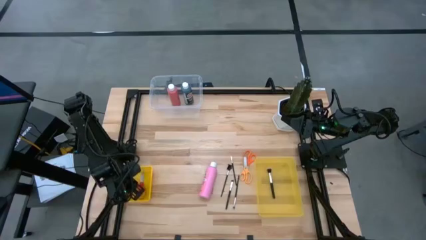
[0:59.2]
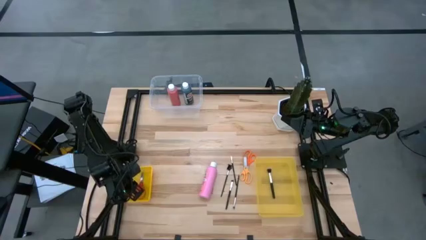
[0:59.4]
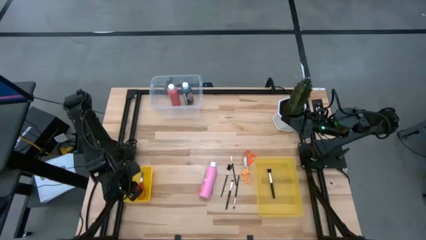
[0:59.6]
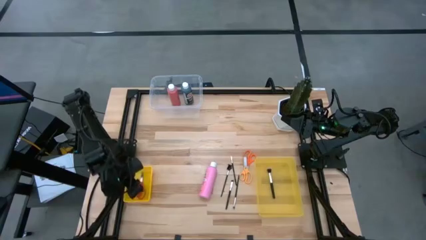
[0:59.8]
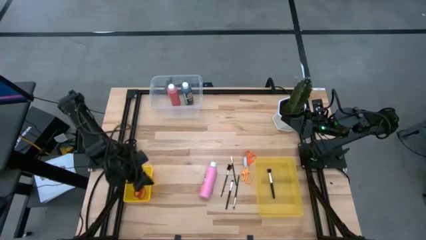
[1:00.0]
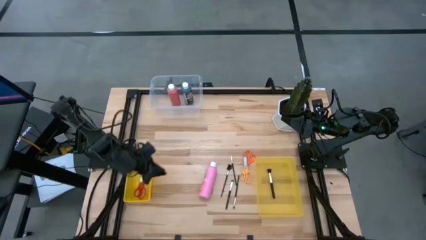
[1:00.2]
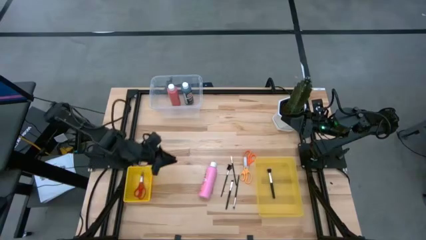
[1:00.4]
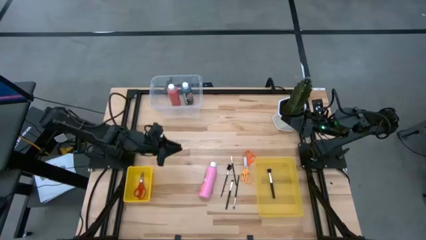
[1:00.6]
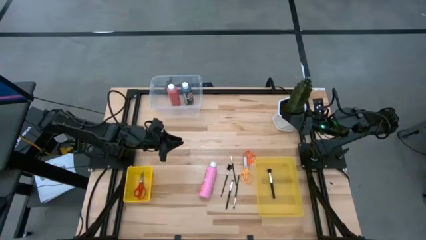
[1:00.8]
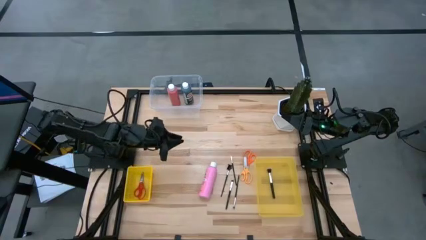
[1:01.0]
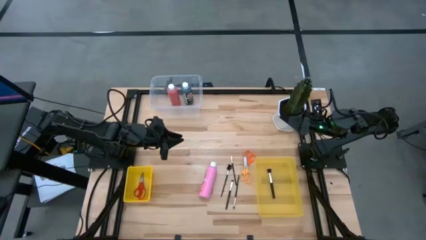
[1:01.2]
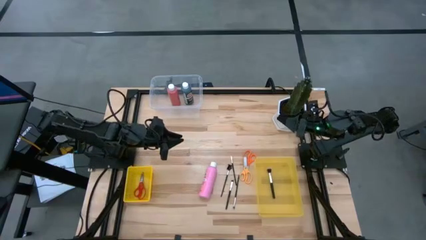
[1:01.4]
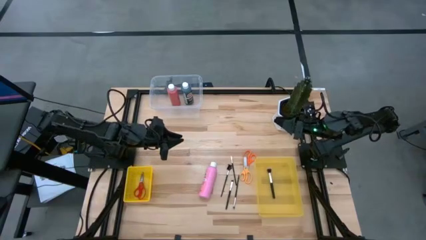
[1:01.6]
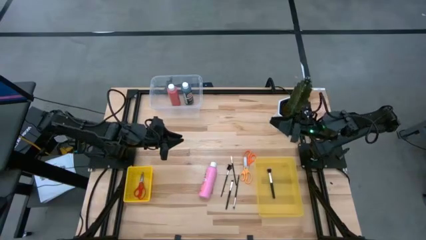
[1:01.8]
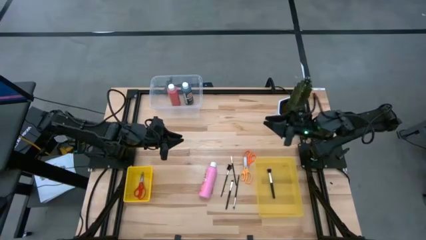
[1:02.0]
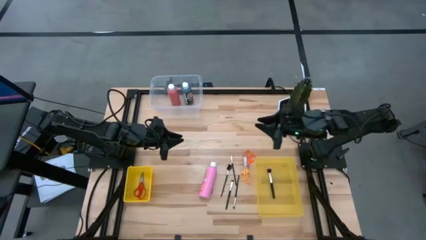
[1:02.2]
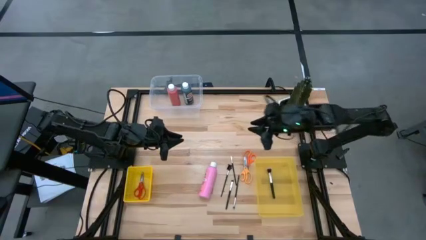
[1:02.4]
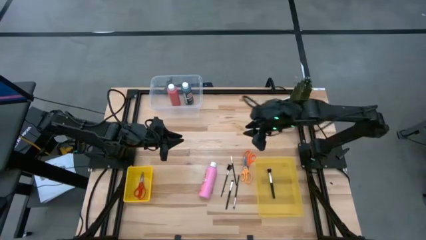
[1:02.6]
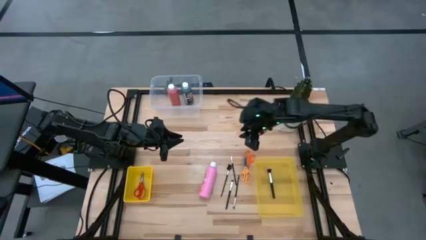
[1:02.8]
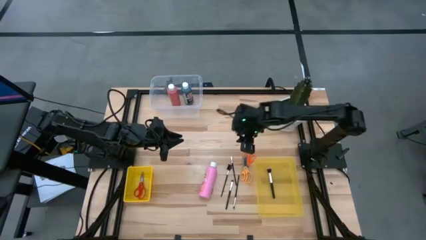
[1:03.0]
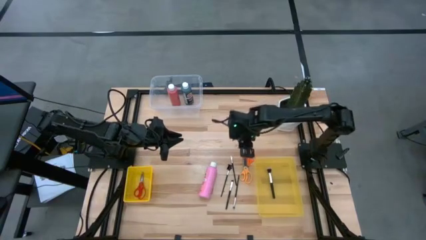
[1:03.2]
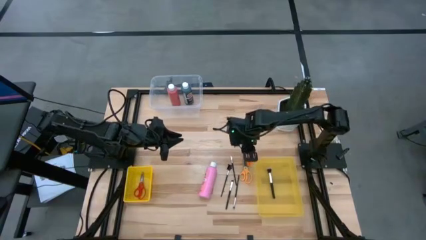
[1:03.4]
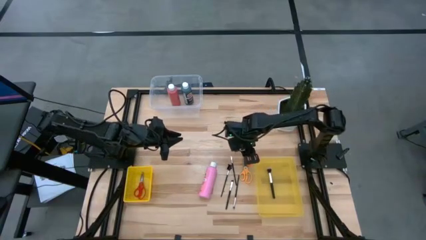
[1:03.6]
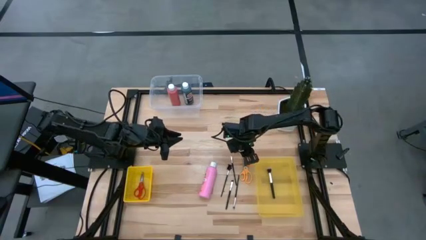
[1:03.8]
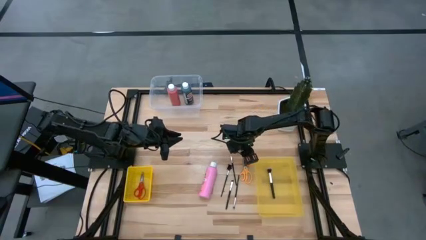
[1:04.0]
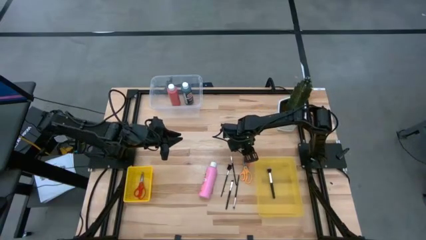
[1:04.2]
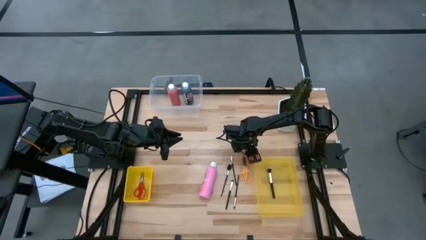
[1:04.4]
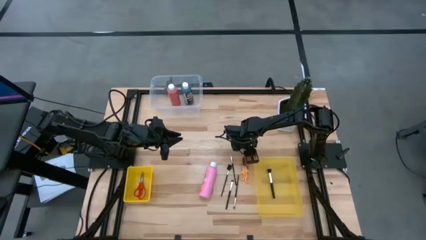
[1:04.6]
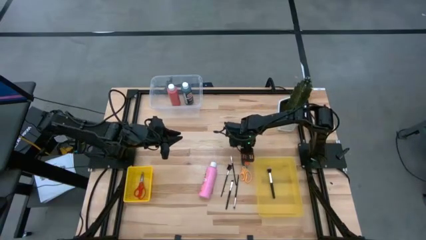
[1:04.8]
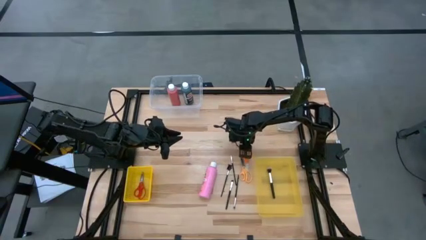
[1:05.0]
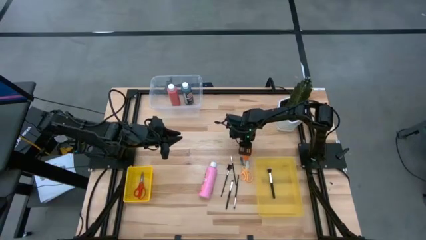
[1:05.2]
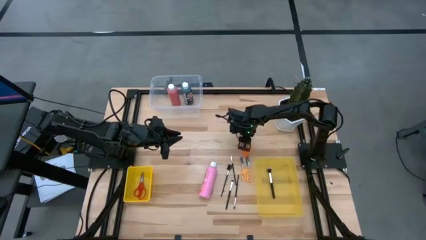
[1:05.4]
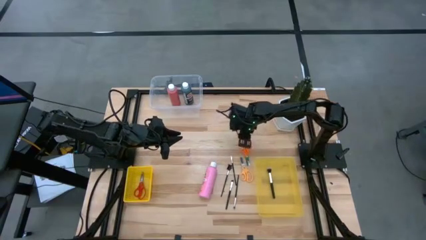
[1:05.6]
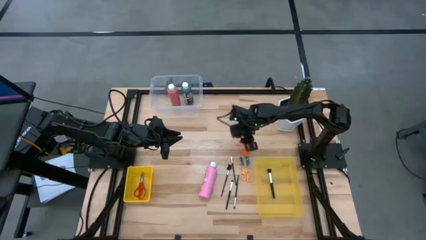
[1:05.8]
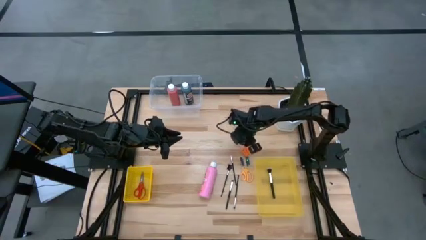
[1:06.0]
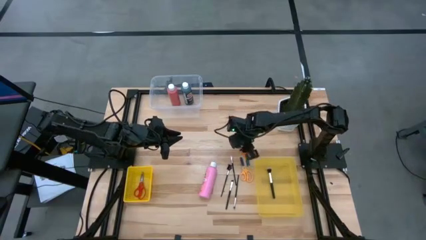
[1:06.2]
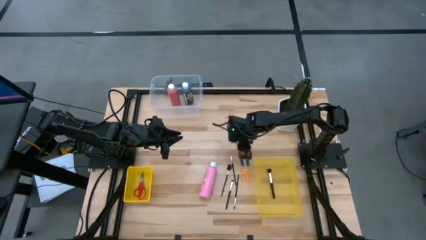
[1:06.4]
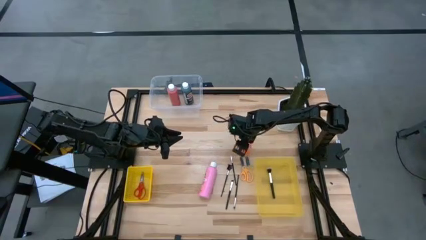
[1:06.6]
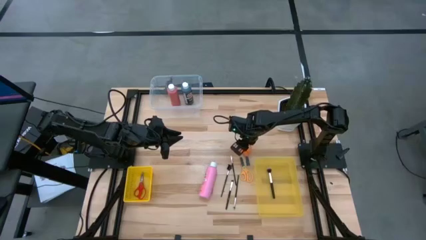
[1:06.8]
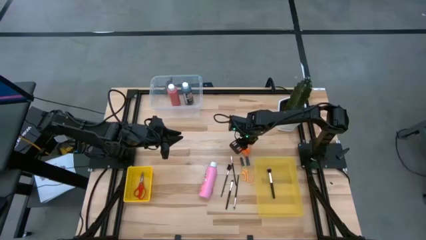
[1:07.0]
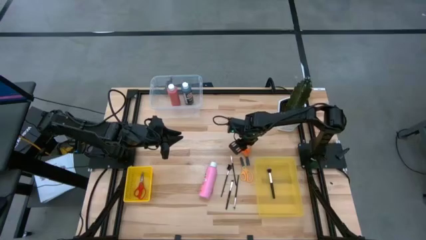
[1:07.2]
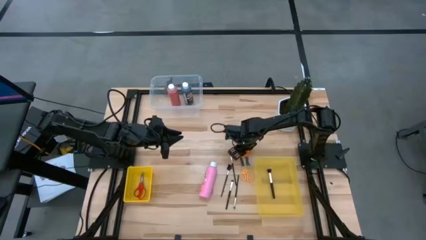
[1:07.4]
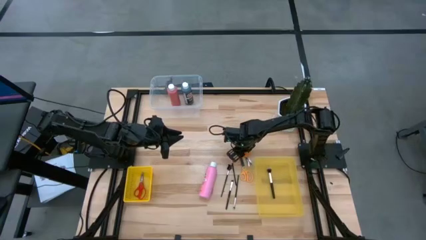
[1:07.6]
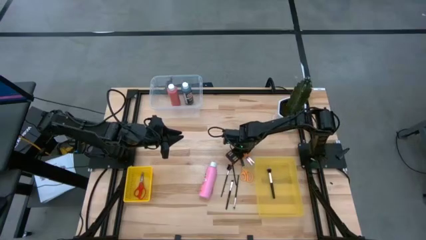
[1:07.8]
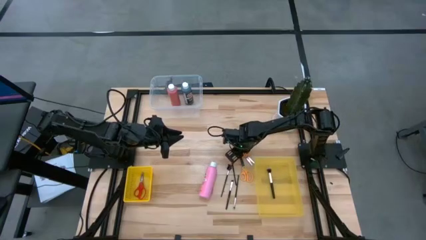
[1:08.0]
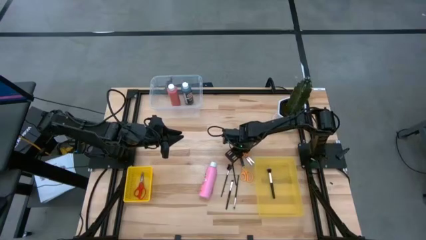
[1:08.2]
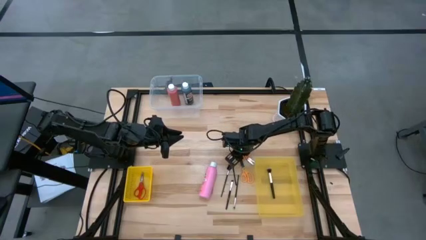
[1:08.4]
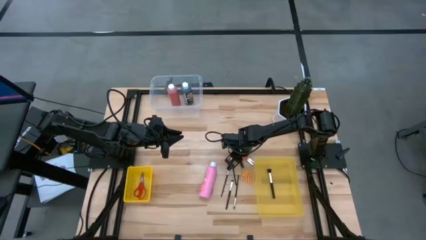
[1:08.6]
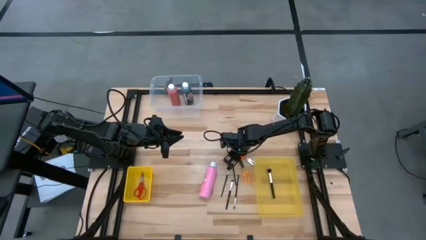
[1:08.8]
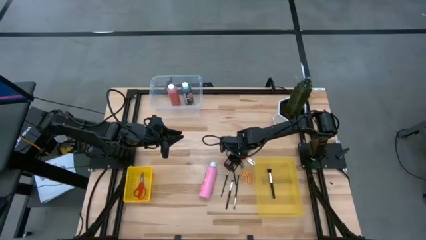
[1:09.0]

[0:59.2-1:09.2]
Task: Pick & Place Paint Supplies
Put the orange scissors into the yellow basket

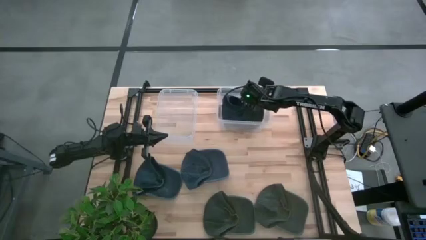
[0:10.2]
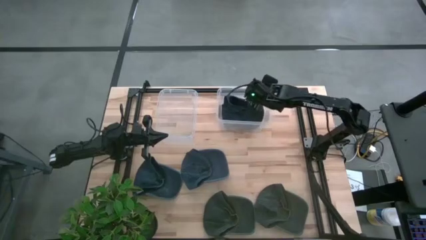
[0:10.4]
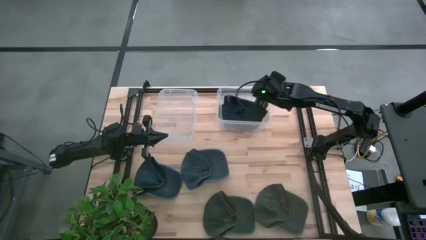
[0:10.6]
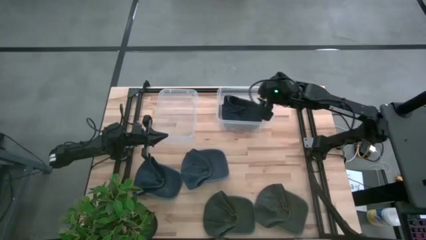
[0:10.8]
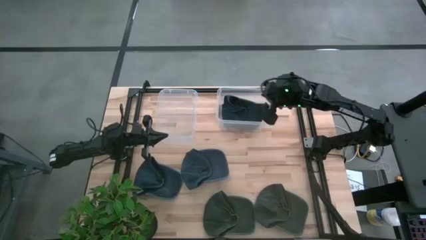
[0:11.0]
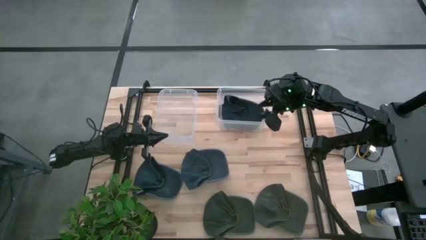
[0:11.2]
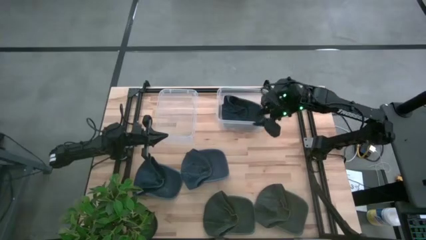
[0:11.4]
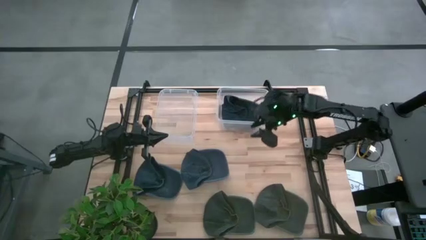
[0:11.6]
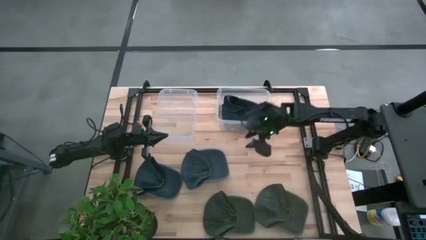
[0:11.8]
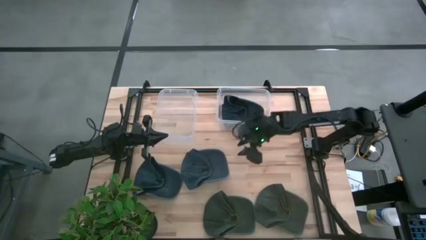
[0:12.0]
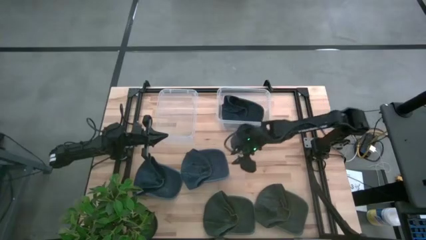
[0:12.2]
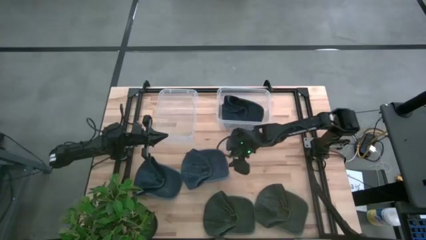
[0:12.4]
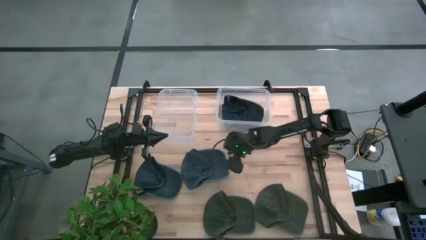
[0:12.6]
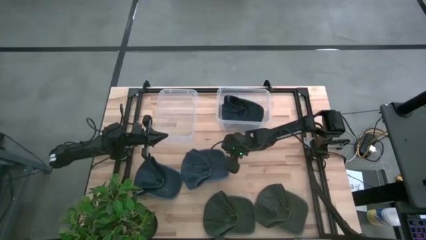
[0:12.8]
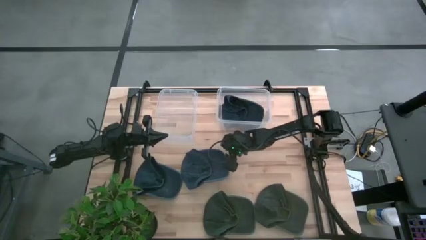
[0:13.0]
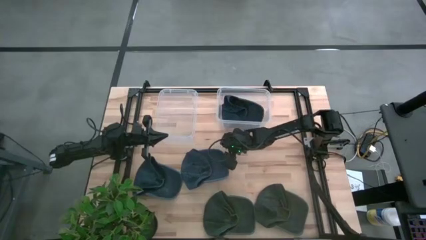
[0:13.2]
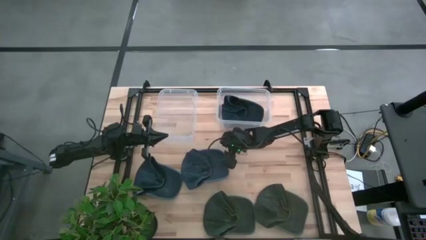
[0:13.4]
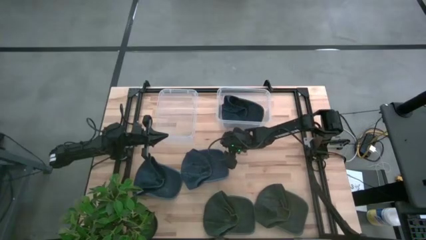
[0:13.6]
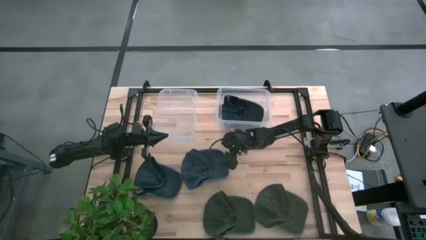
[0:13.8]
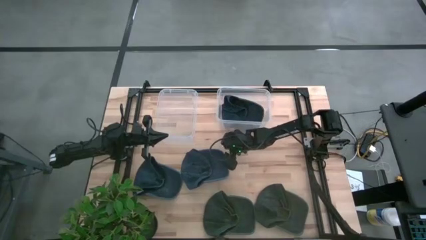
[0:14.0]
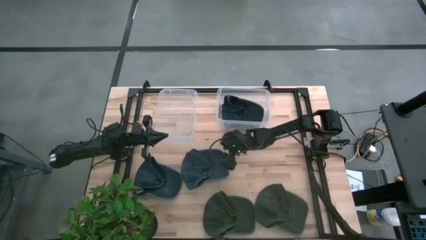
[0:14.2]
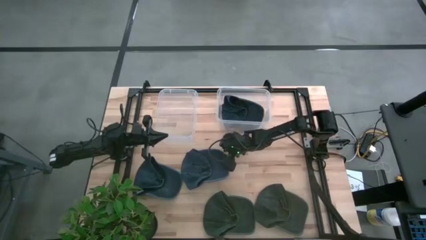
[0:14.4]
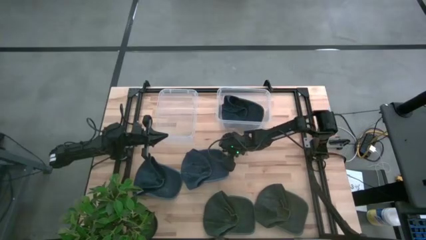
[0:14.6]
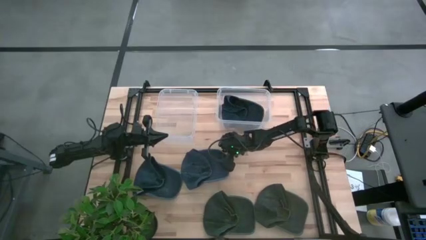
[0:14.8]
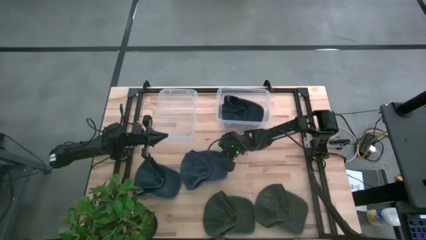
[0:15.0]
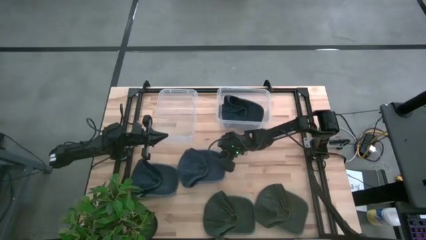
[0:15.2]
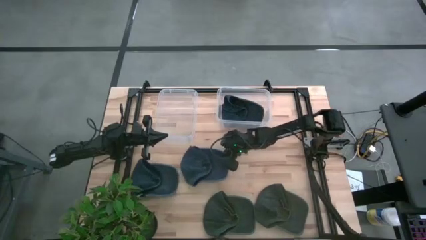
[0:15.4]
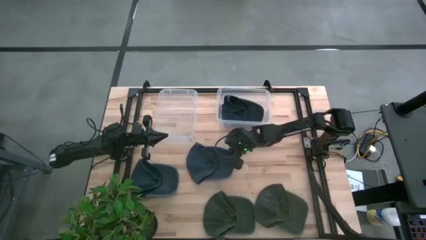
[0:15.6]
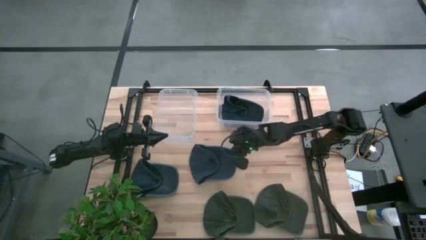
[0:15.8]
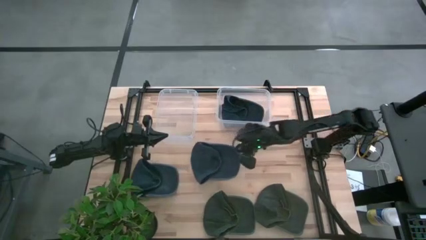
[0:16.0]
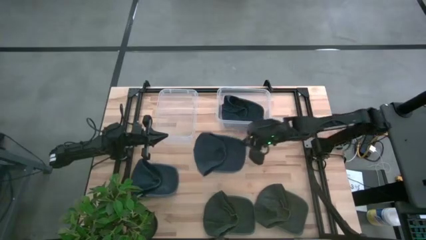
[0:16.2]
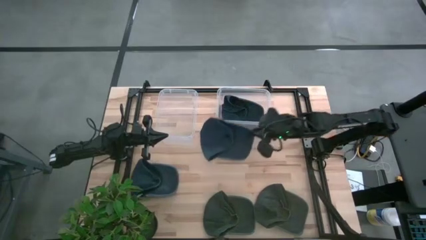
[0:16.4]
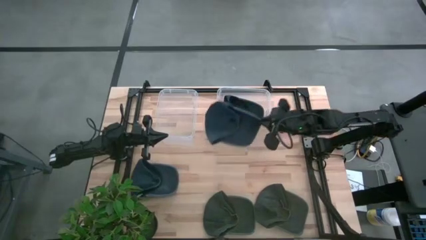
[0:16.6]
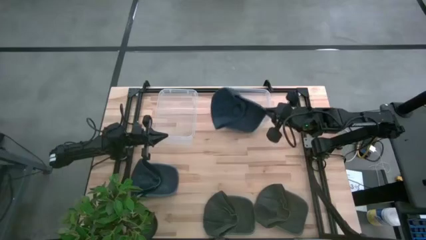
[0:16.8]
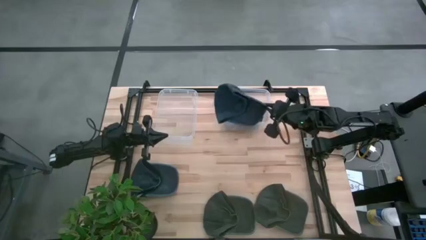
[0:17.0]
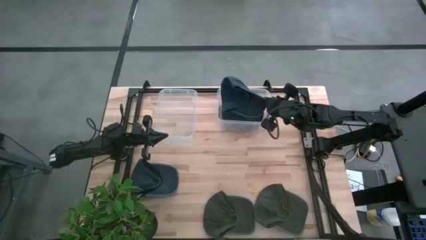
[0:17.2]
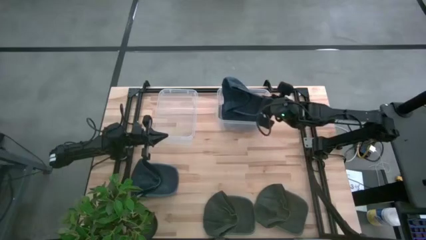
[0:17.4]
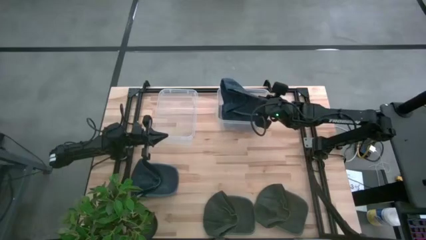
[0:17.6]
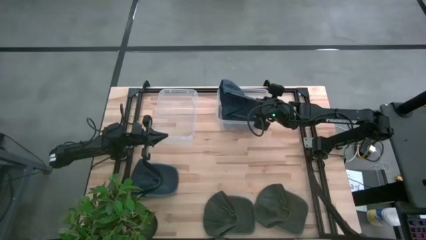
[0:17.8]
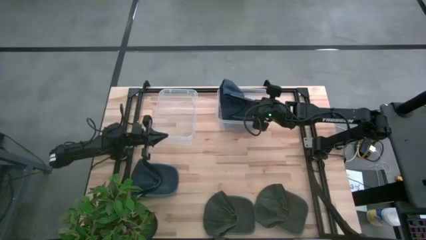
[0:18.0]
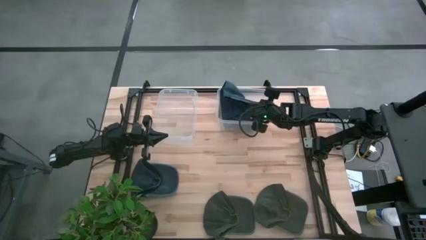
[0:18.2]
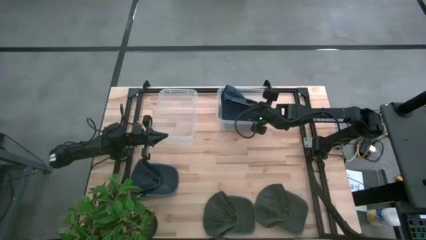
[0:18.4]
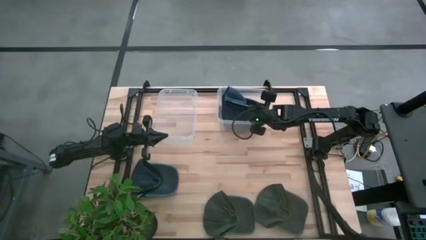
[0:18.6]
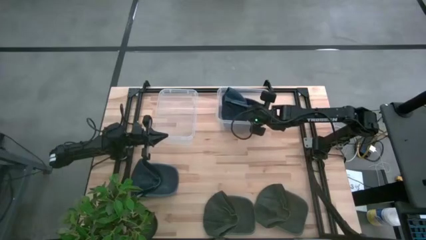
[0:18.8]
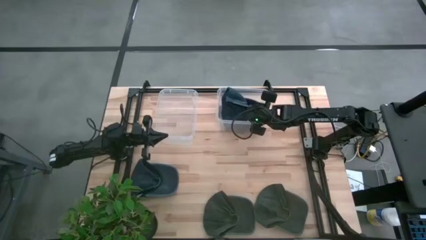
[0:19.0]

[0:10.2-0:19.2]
Task: Pick & Place hat
Put the right blue cap into the right transparent bin
